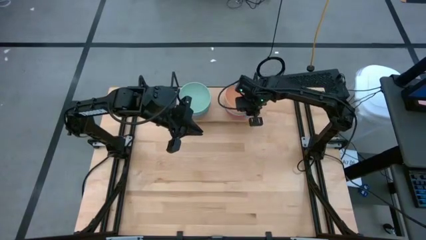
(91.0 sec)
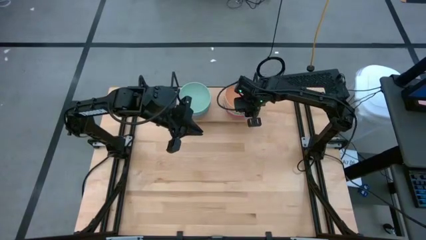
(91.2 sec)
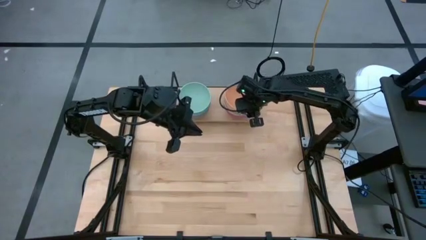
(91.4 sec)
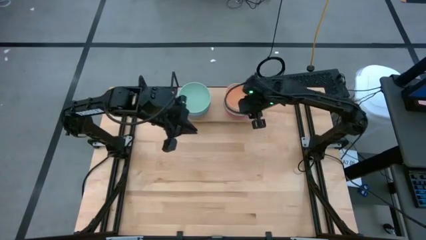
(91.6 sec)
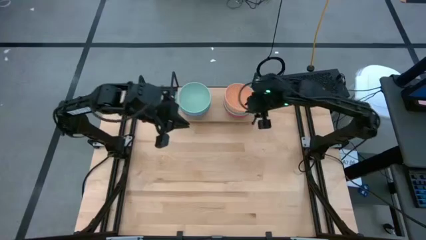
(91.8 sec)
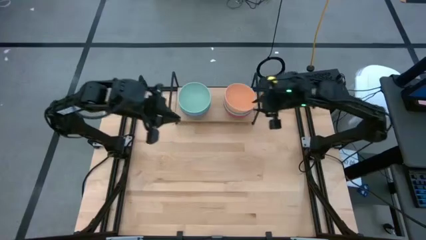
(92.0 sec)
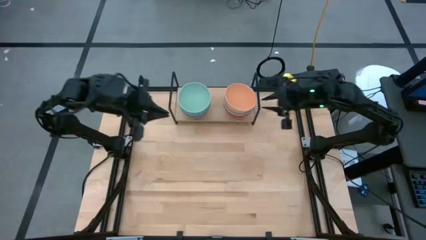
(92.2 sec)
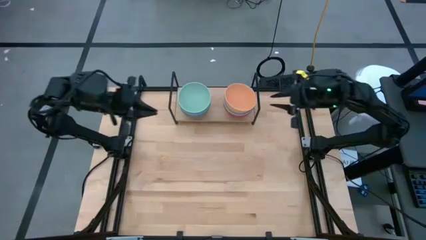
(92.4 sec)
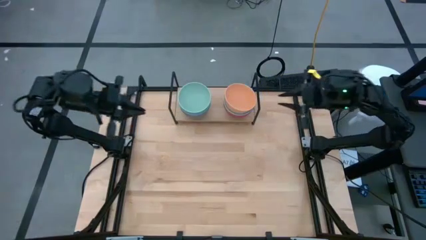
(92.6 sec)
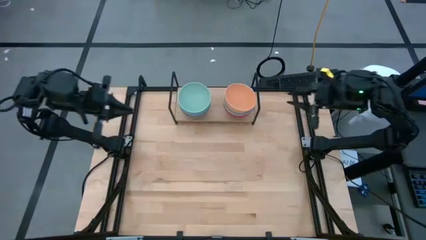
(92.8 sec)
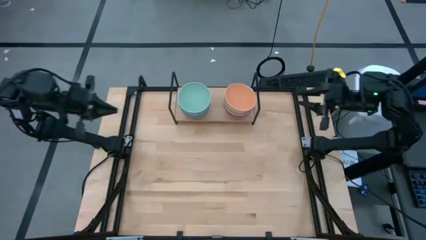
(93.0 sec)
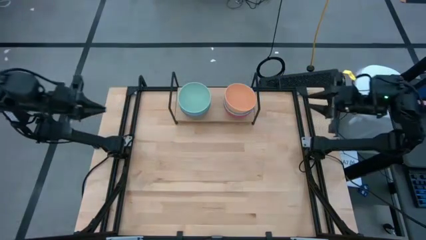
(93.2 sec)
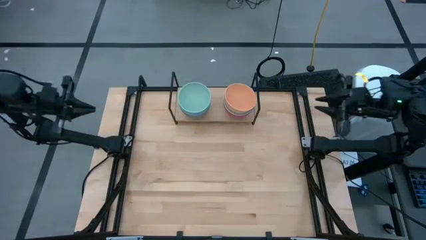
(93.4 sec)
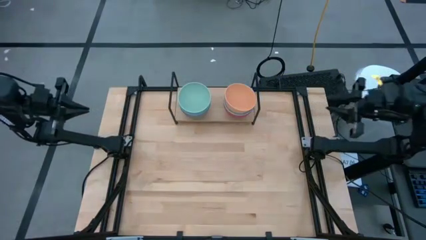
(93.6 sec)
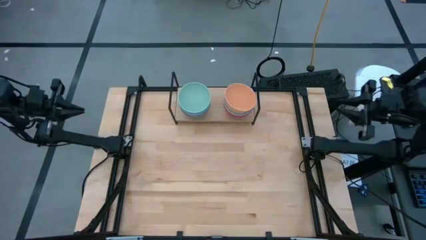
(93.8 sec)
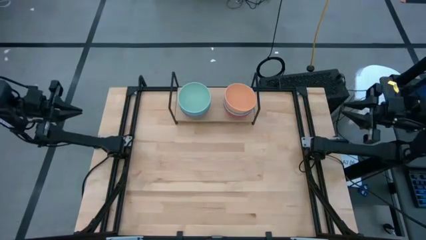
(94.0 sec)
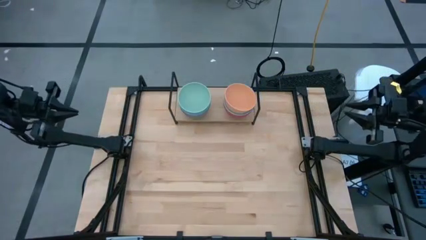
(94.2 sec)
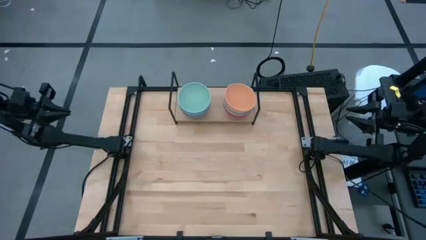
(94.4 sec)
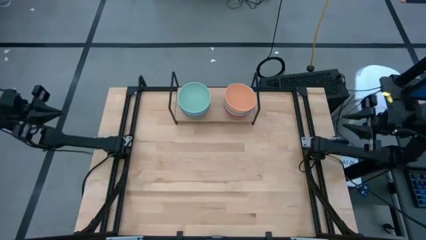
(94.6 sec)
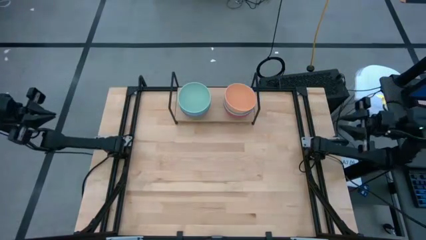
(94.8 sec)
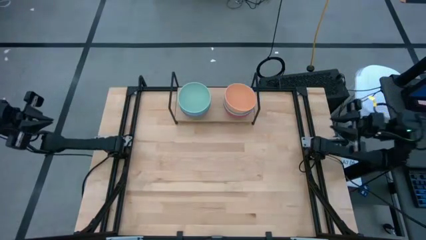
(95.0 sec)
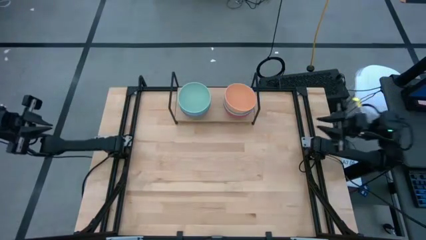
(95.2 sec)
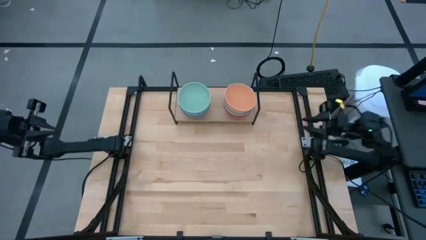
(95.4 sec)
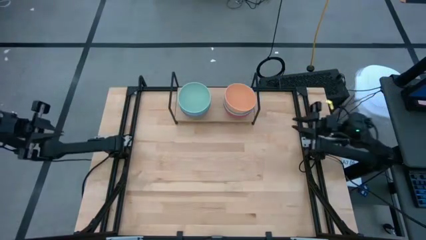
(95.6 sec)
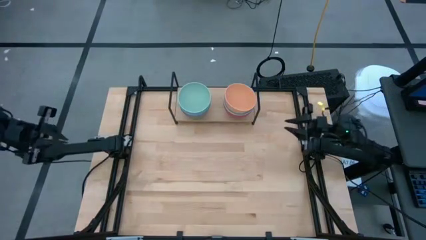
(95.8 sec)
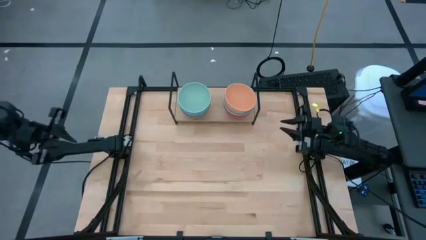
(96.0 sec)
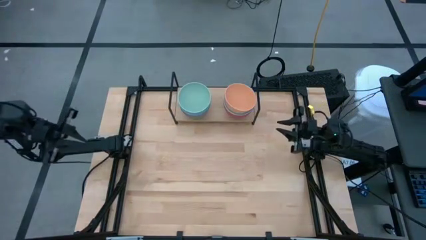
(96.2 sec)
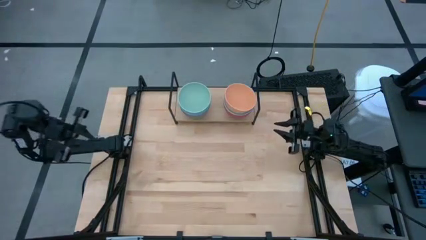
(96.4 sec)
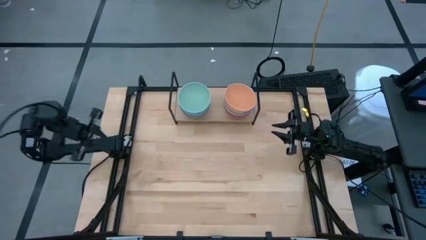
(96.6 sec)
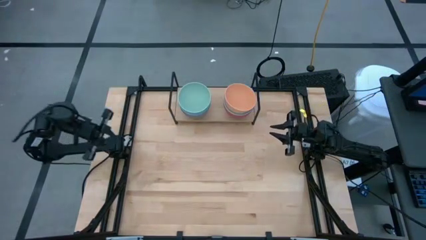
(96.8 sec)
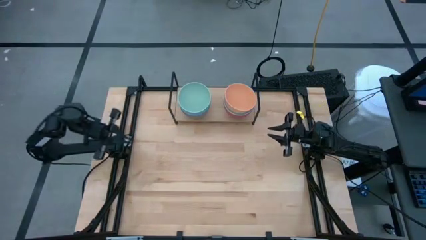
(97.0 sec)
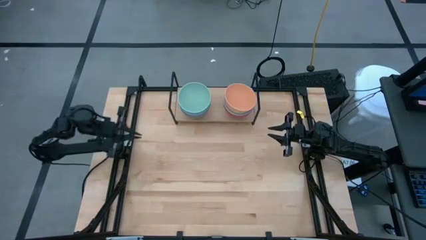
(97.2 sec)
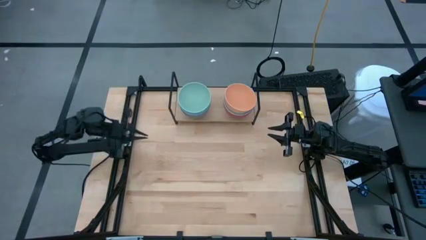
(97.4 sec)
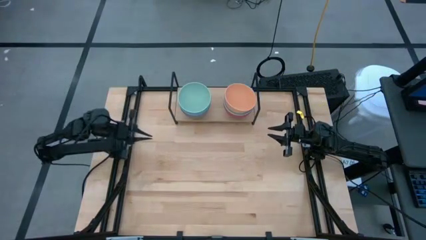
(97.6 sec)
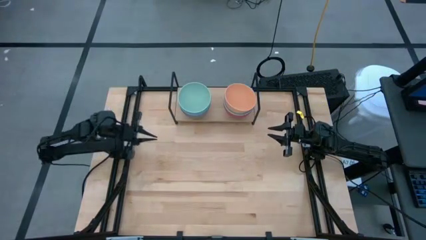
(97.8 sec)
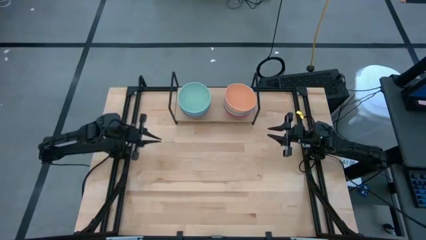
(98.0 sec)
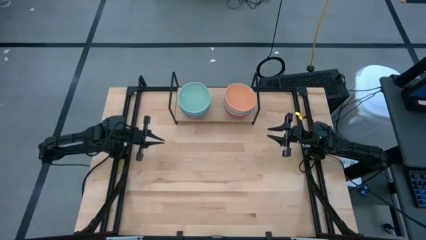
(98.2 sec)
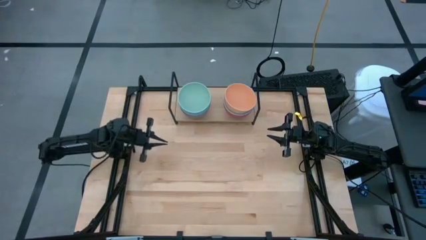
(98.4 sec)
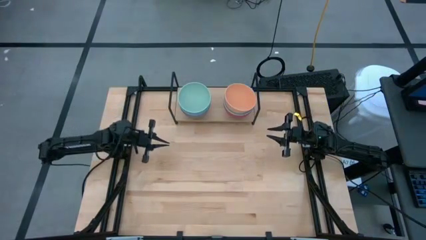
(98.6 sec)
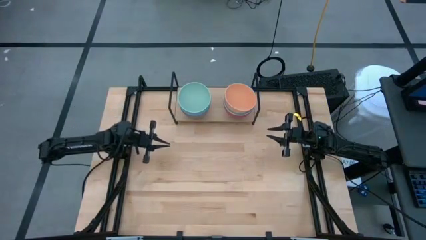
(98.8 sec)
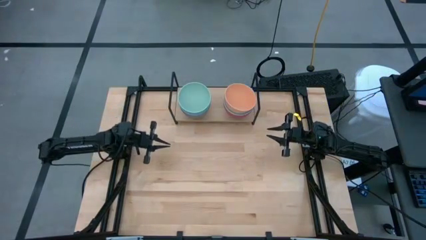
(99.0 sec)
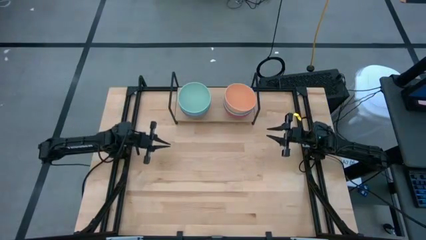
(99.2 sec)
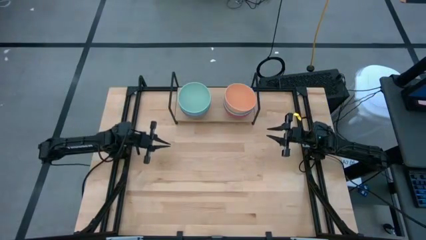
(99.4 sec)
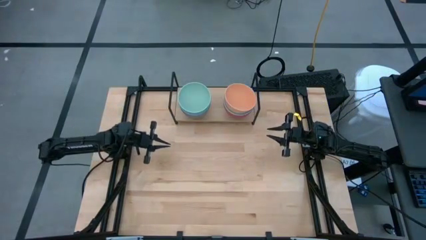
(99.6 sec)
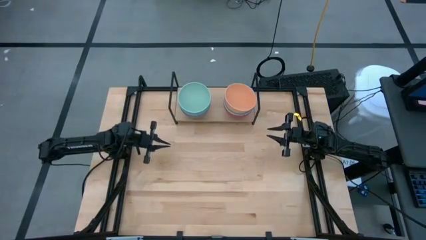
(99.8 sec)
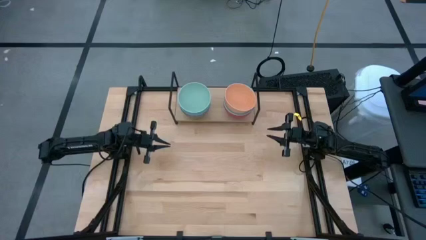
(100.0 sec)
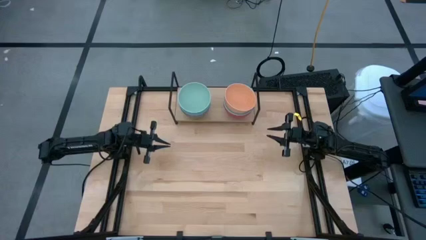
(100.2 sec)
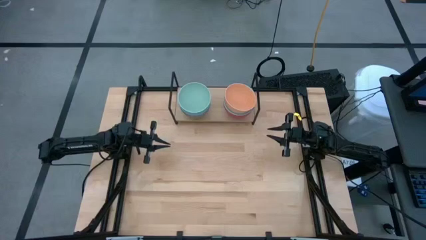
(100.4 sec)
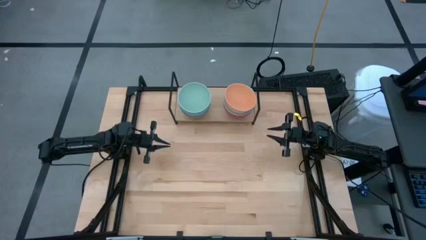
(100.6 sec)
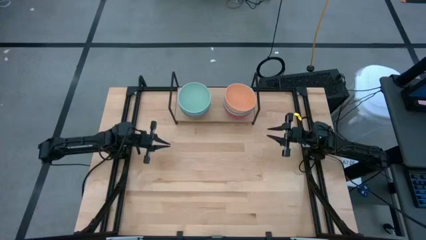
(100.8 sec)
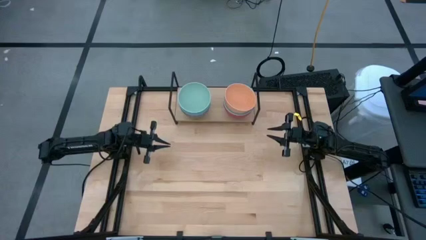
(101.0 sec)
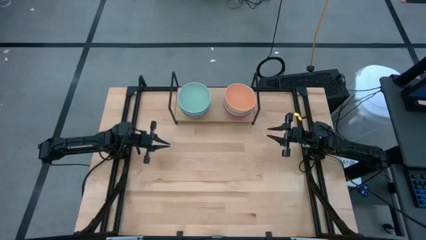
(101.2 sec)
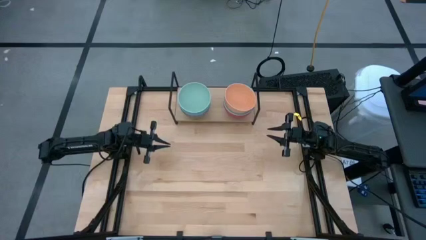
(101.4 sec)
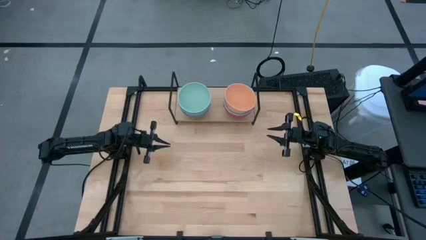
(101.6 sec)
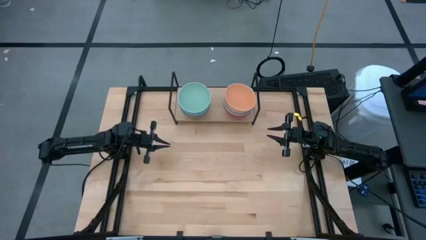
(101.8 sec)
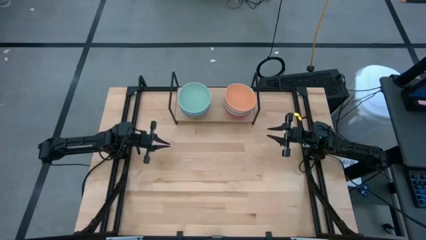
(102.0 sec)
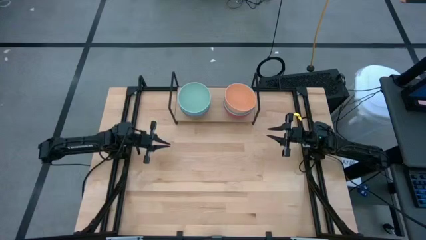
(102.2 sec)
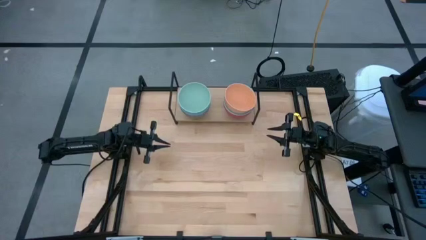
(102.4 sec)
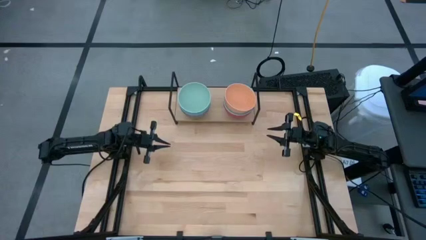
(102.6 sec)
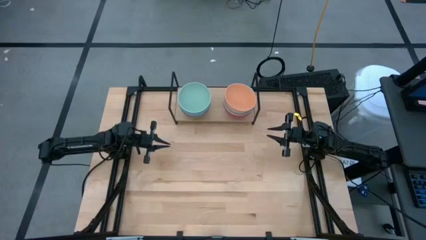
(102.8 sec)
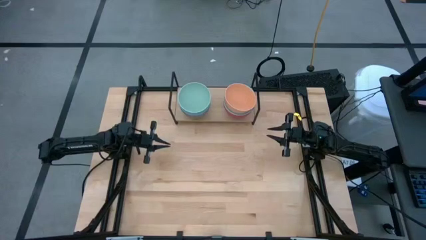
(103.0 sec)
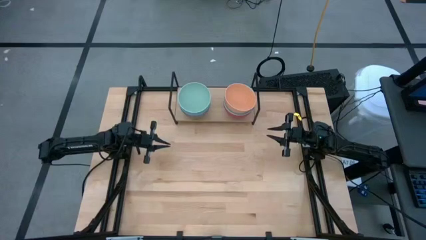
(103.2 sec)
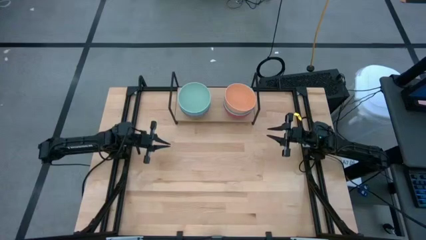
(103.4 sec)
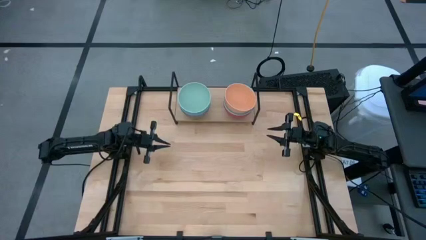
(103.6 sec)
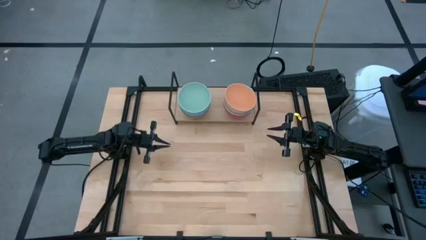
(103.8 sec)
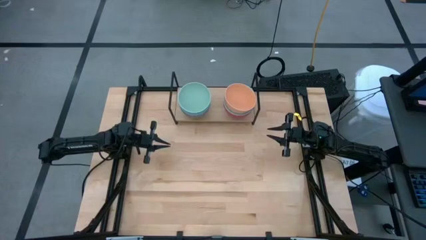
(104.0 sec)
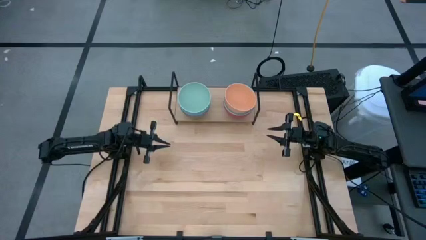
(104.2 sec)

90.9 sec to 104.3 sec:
Task: Place and stack bowls onto a shelf
Return to Home Position
